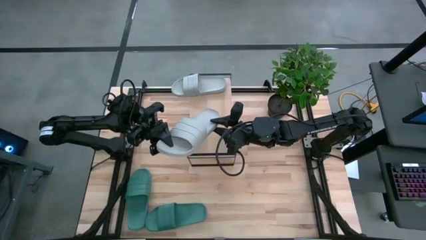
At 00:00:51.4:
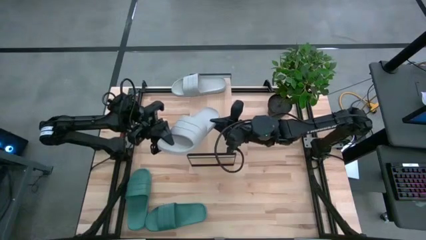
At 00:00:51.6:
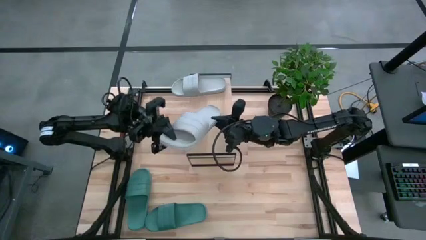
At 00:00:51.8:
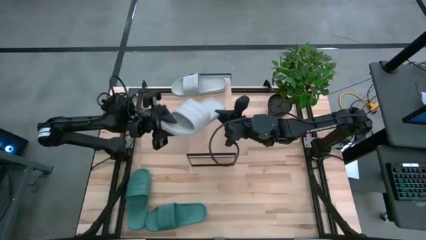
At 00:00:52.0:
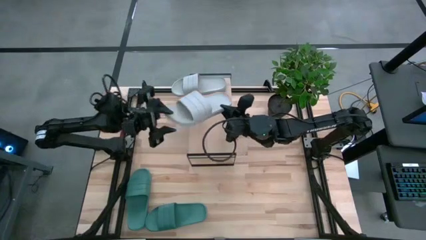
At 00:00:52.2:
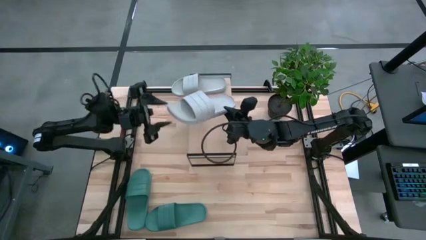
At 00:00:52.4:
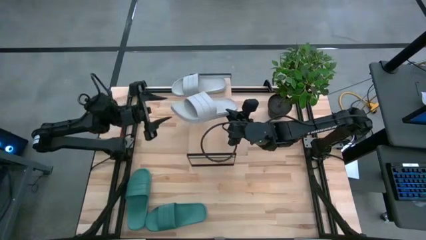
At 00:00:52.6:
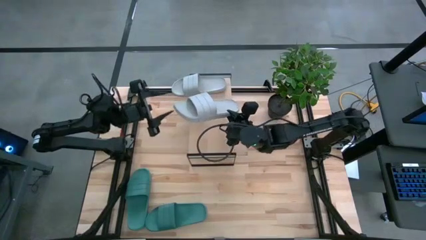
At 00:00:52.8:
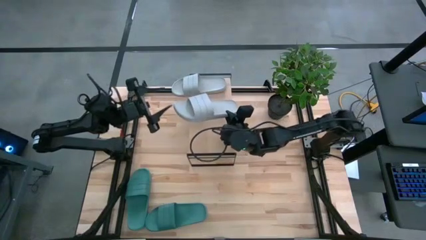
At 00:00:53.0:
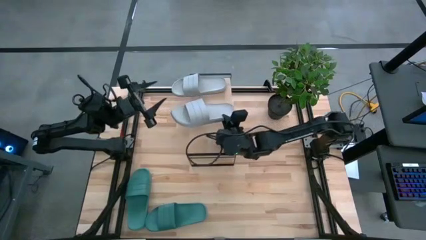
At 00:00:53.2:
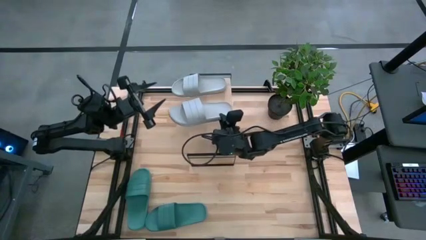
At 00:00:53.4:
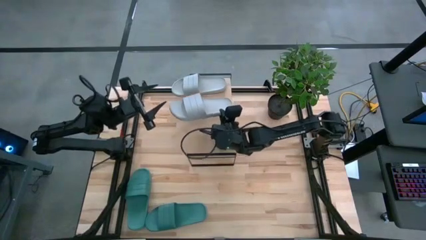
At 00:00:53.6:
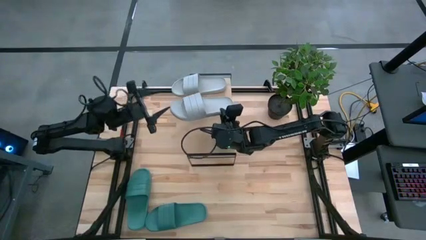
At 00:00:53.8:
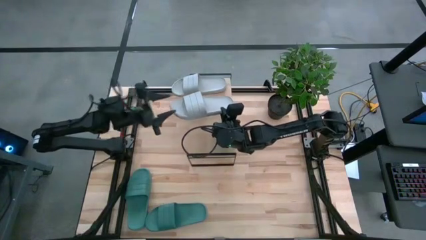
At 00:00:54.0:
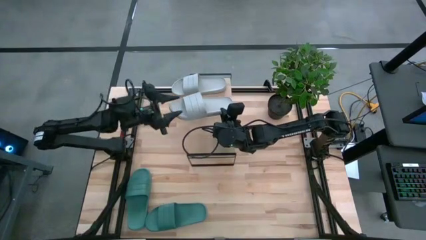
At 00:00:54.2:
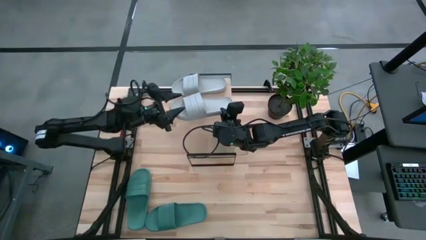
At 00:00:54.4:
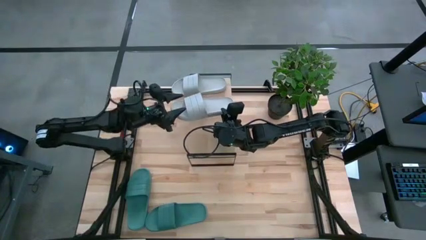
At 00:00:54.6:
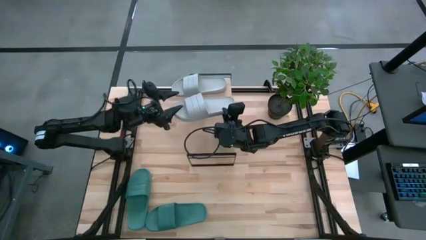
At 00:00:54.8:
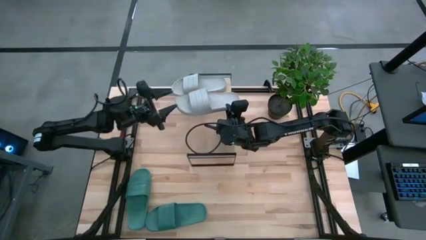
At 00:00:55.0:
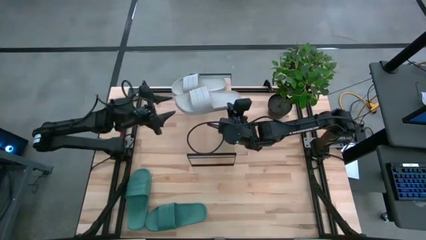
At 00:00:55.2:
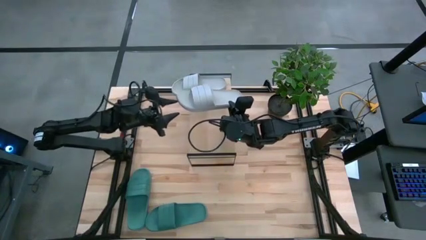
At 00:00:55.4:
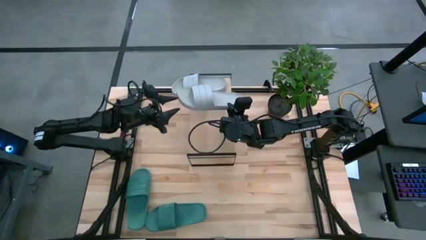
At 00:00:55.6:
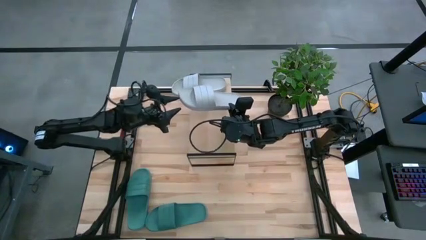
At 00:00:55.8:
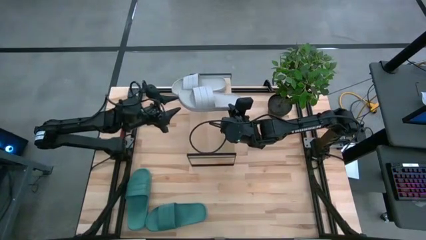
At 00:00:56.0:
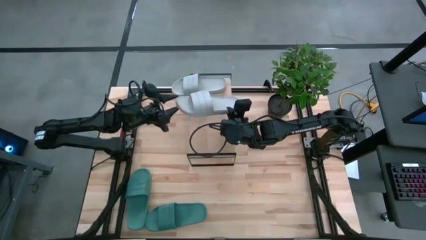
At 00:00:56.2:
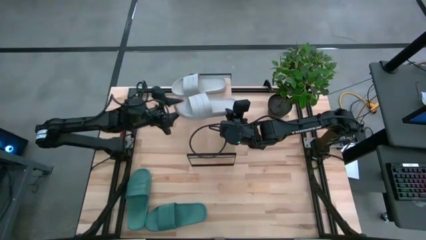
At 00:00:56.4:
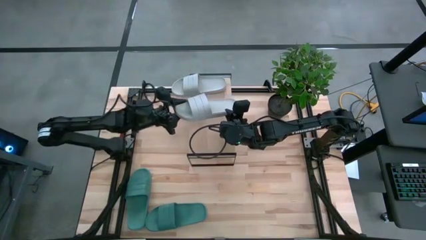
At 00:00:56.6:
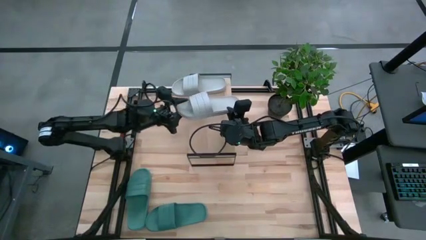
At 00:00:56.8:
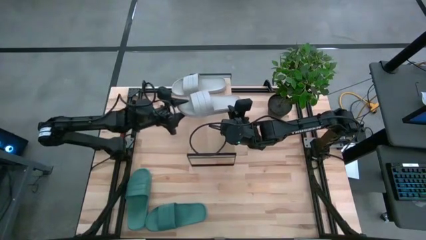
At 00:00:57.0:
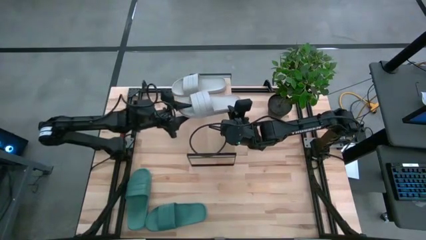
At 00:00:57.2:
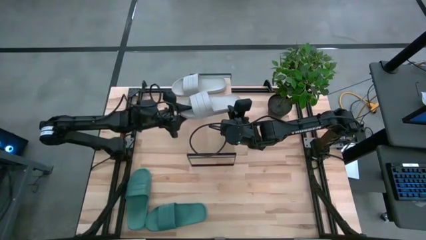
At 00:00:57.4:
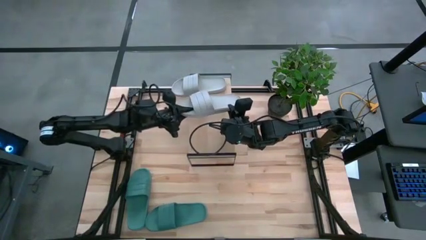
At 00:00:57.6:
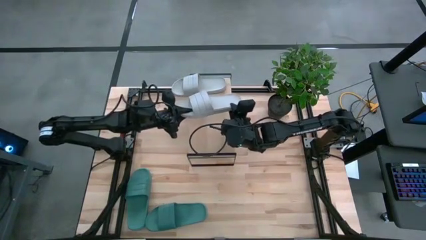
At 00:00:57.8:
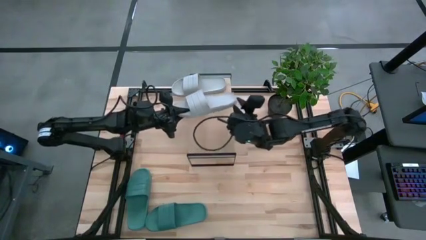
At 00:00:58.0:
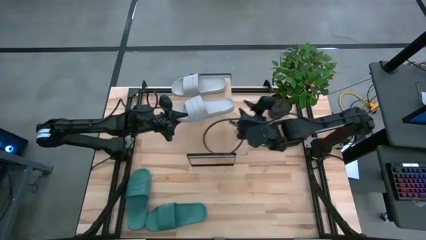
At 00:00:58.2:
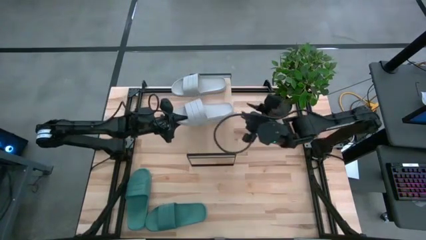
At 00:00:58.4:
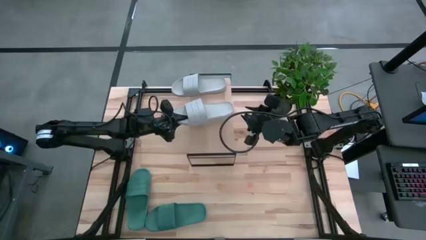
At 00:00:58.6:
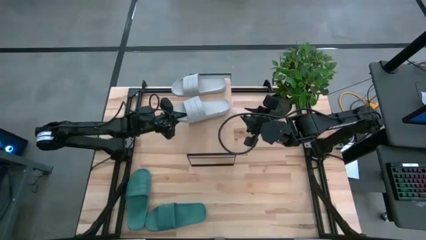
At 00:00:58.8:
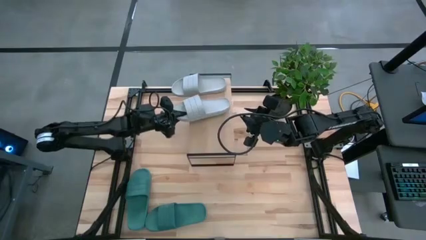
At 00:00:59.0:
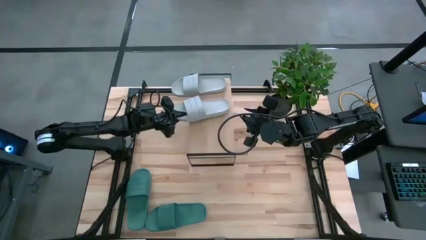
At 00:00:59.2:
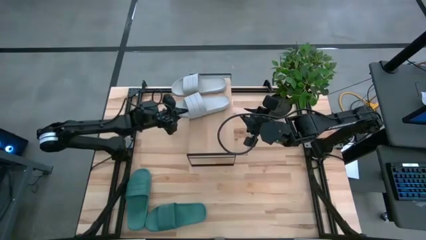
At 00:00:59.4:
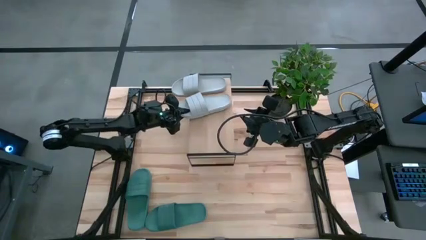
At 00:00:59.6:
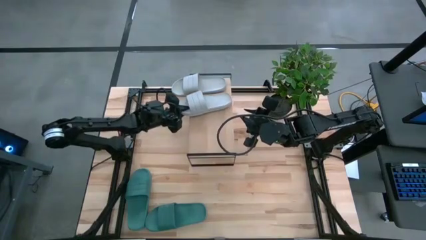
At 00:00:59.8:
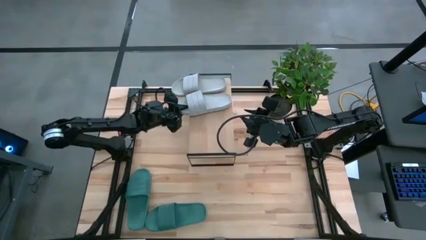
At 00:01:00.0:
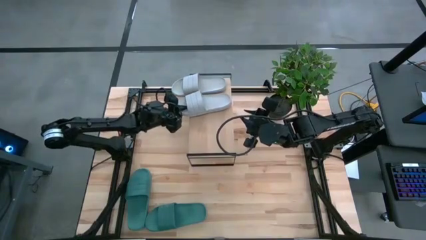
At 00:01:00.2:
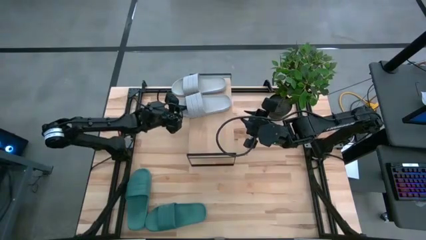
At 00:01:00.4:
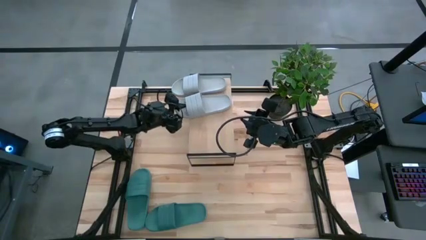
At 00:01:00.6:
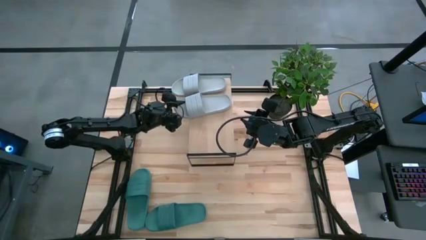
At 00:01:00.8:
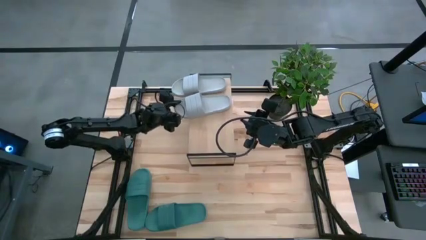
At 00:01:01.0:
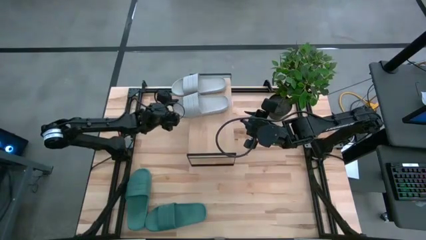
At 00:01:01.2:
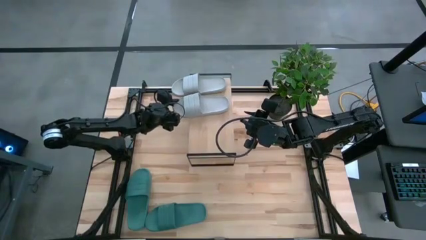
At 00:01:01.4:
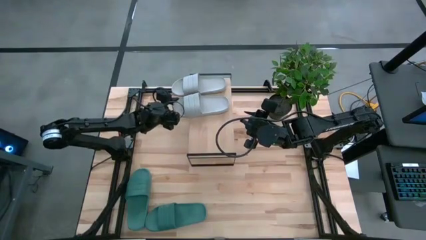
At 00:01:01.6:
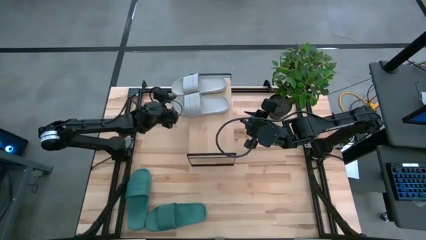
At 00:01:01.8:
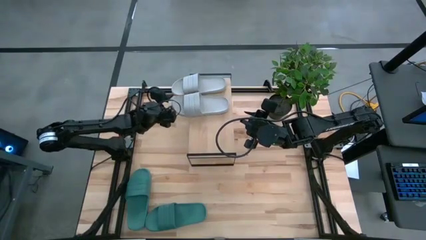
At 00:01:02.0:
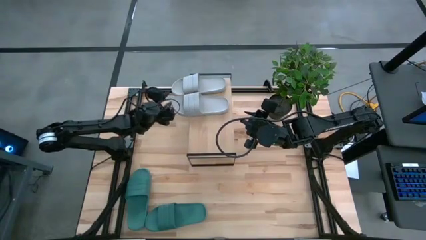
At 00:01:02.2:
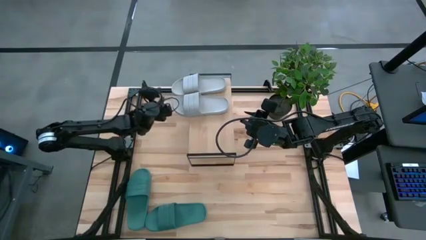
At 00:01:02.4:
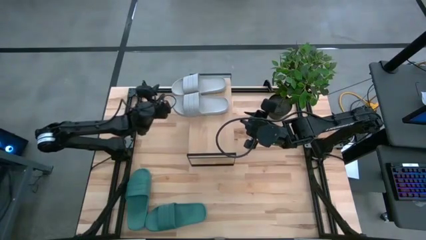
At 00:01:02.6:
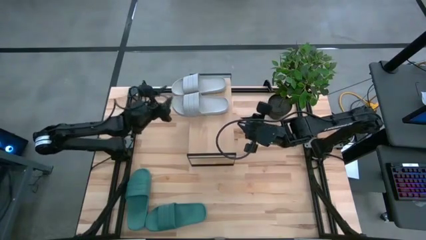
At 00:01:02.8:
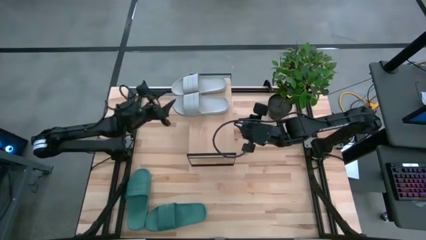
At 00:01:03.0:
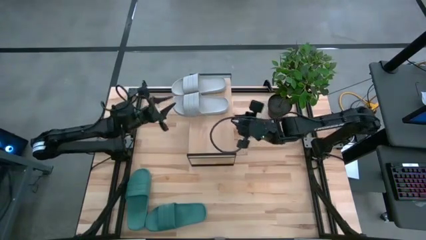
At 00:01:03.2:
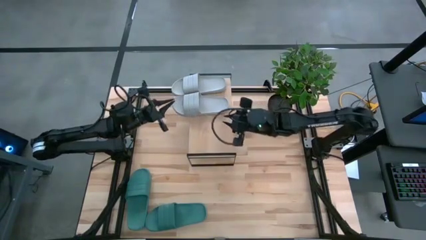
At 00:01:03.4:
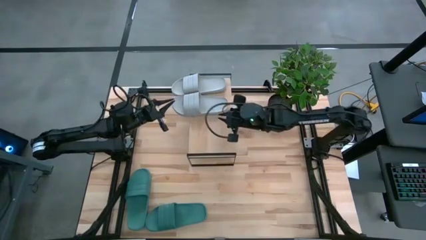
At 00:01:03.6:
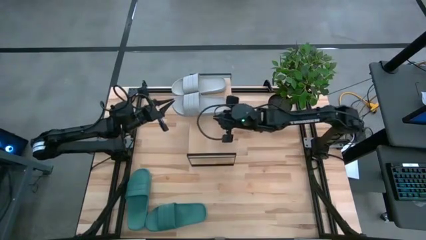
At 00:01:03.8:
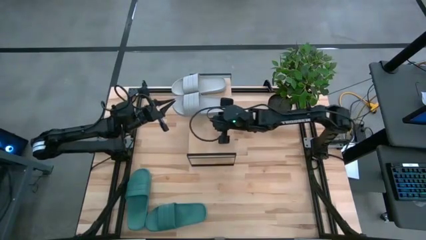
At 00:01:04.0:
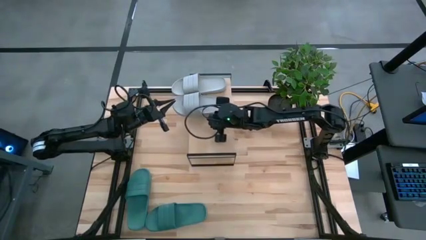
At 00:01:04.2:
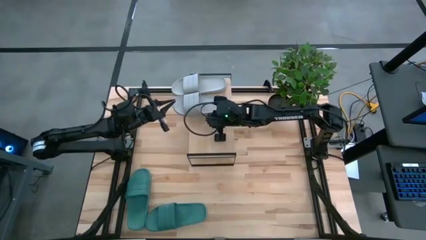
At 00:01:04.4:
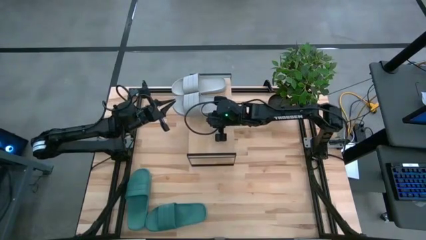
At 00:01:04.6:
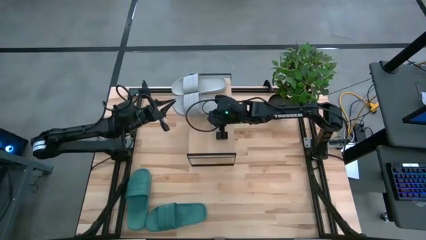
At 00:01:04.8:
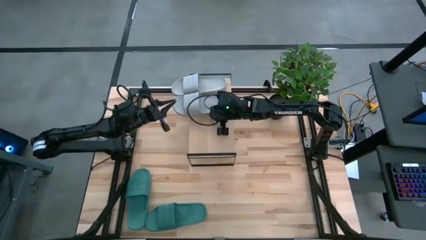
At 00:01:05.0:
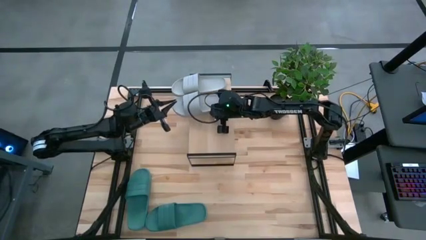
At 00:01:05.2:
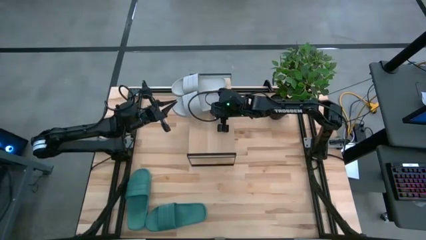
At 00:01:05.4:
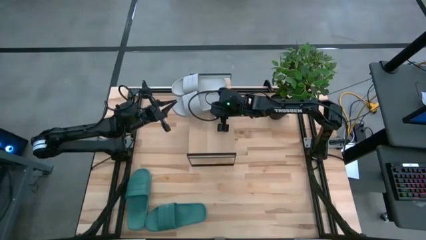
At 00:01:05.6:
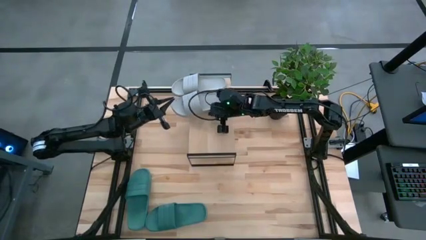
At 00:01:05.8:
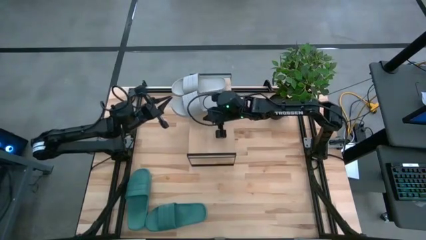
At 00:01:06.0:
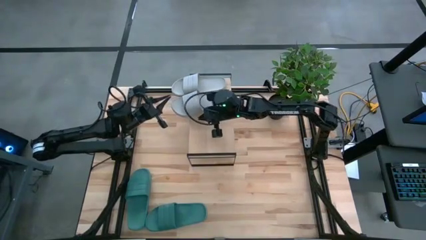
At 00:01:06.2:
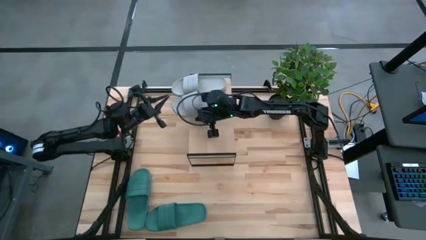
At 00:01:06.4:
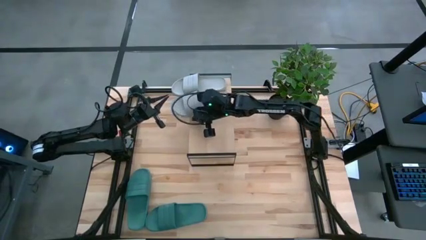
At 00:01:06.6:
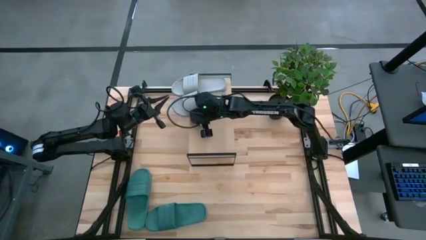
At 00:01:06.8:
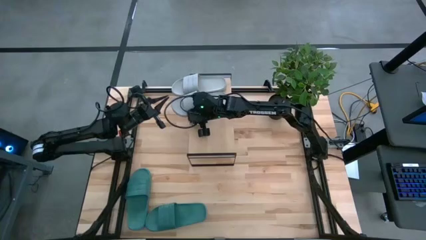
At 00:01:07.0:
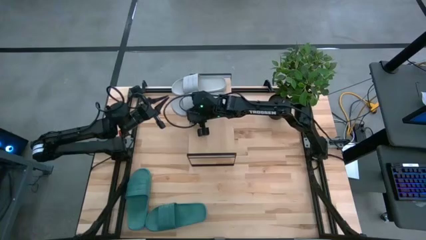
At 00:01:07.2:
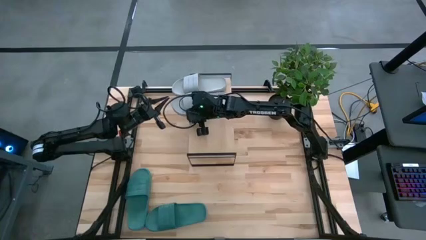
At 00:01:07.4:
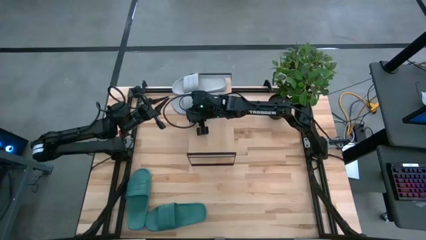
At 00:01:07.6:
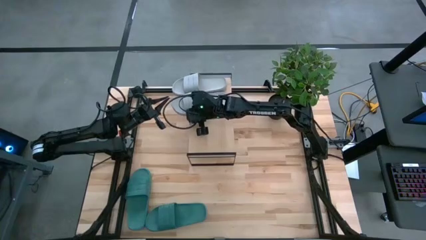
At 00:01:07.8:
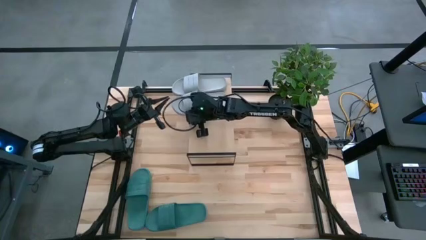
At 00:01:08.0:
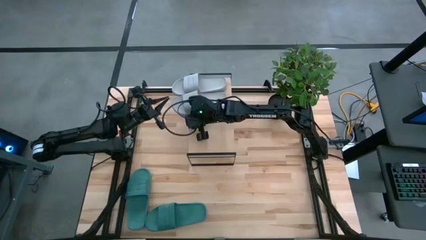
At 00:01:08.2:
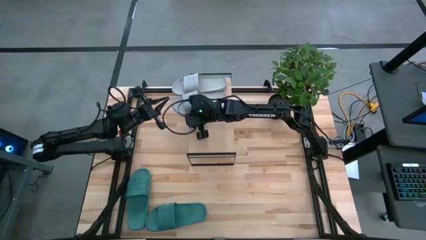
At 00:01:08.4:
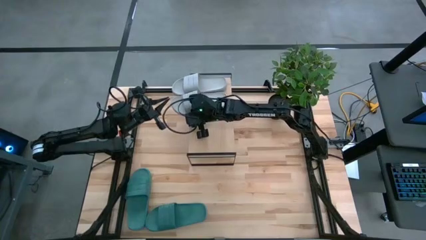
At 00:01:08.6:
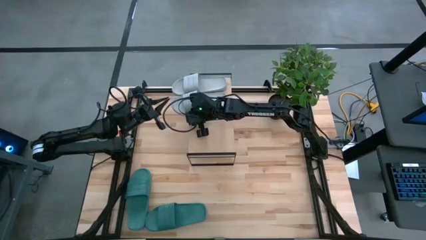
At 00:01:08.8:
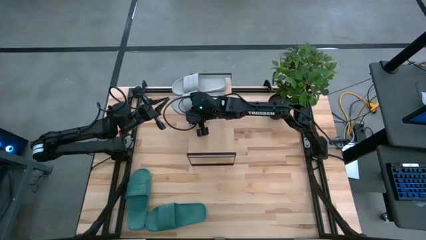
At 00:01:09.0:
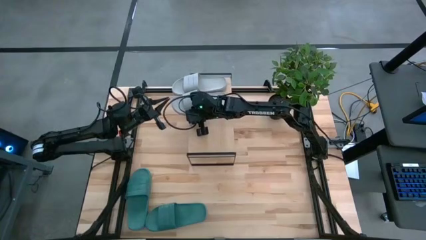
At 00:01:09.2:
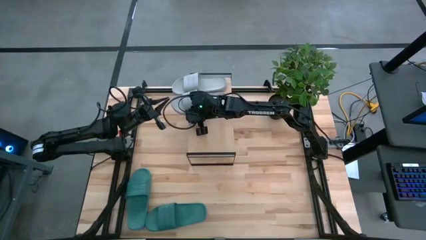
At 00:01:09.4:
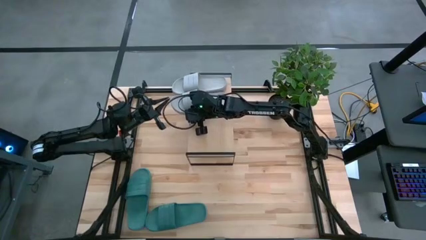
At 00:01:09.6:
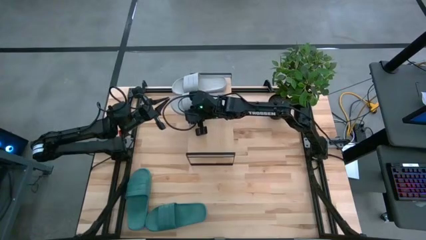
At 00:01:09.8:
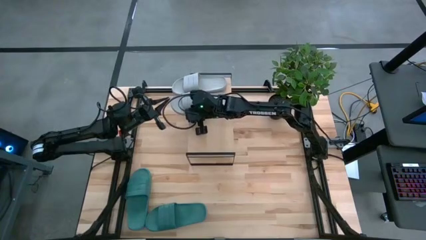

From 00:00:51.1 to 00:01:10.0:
Task: Pick and place slides into the shelf
Put the gray slide on the shelf
